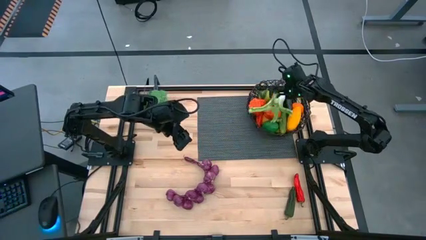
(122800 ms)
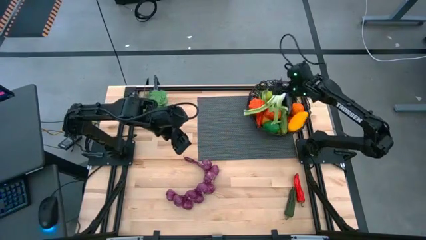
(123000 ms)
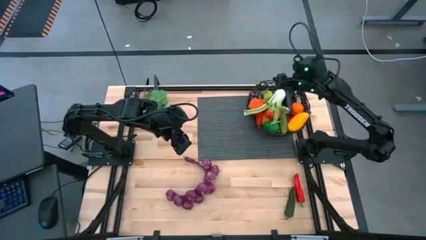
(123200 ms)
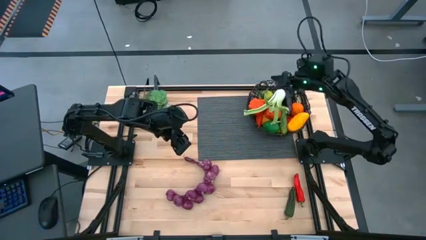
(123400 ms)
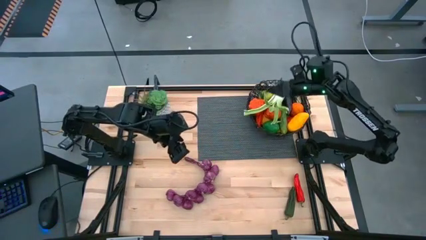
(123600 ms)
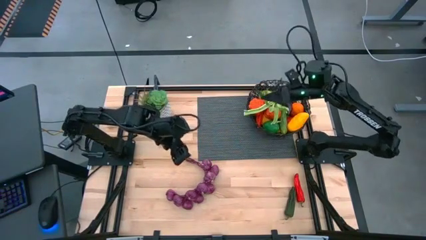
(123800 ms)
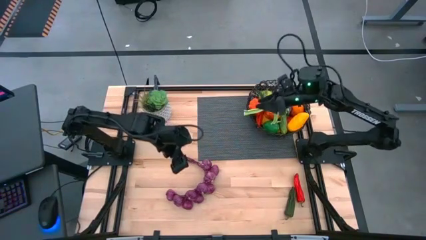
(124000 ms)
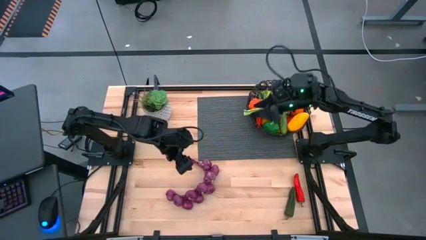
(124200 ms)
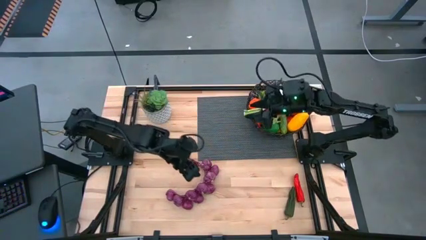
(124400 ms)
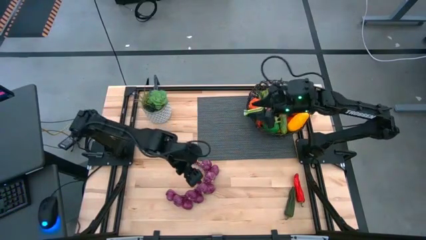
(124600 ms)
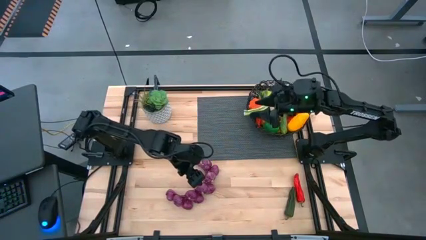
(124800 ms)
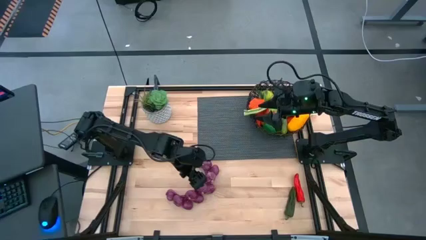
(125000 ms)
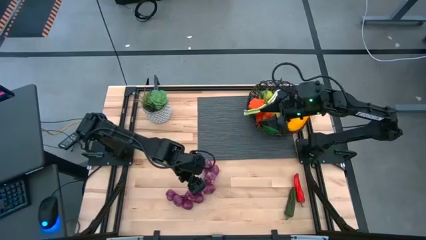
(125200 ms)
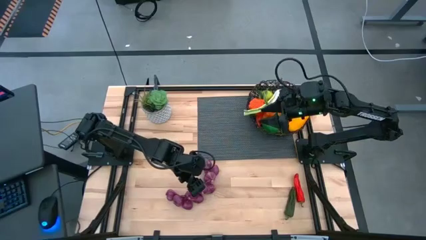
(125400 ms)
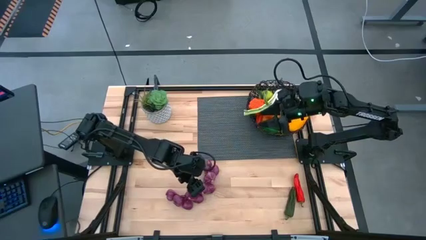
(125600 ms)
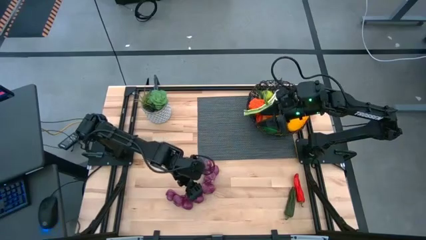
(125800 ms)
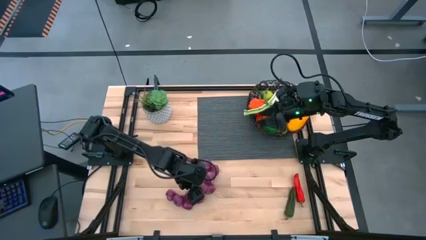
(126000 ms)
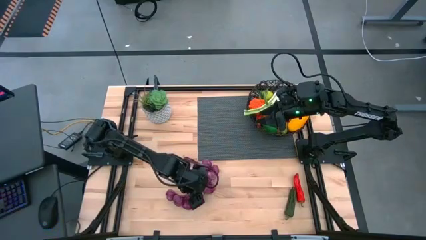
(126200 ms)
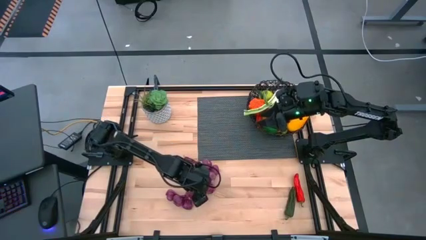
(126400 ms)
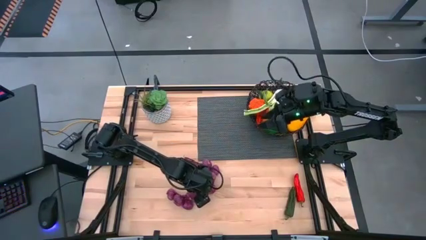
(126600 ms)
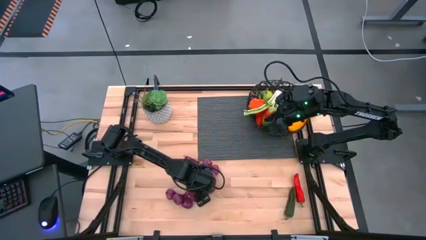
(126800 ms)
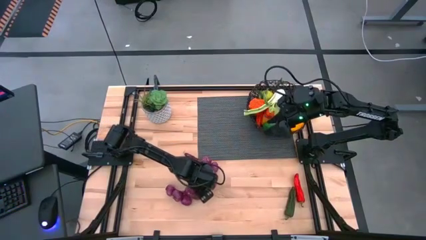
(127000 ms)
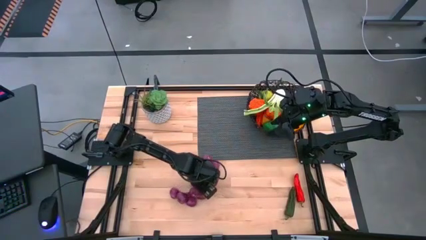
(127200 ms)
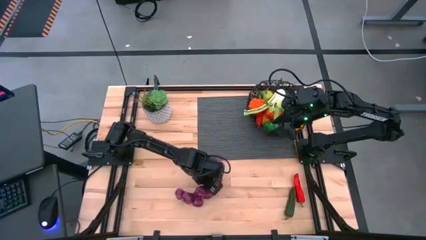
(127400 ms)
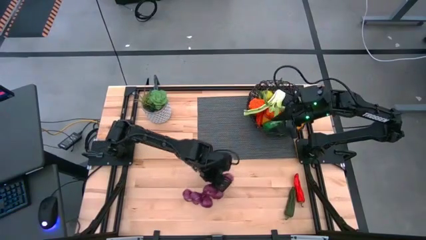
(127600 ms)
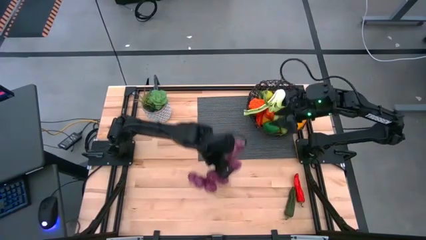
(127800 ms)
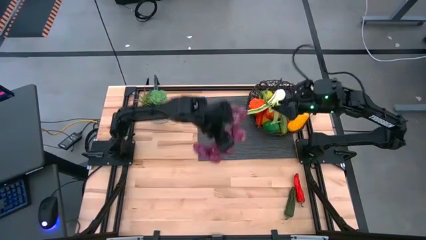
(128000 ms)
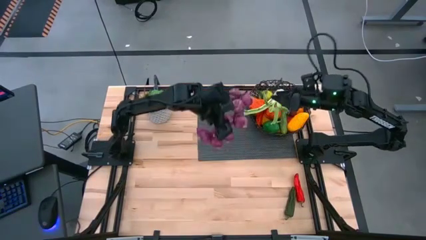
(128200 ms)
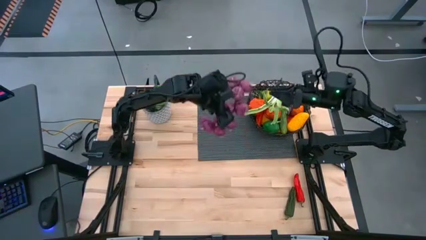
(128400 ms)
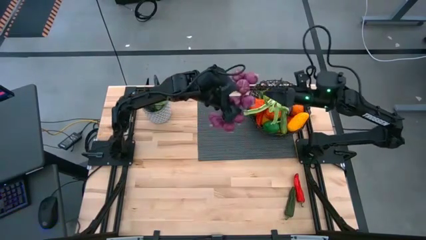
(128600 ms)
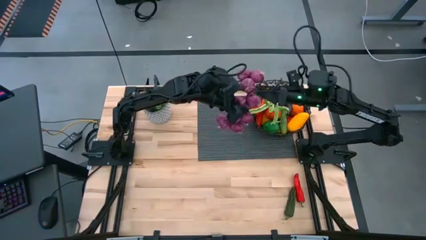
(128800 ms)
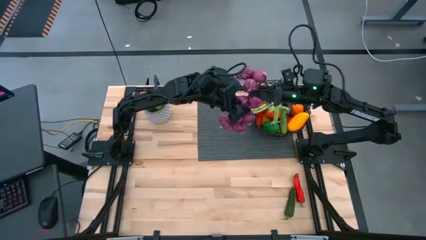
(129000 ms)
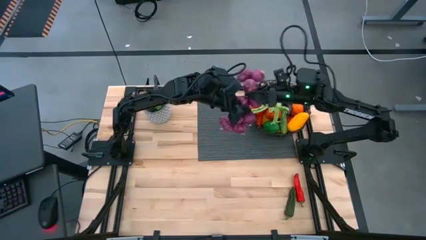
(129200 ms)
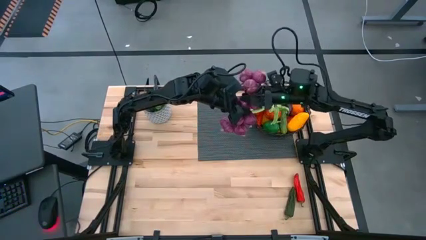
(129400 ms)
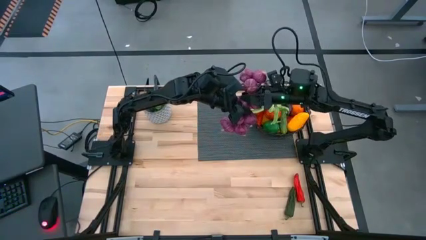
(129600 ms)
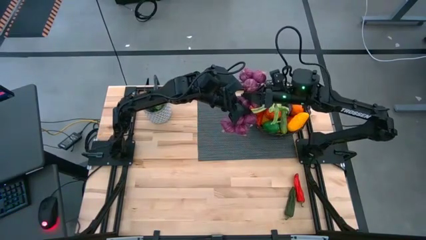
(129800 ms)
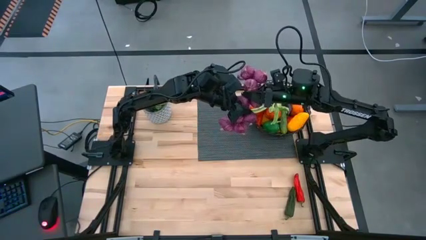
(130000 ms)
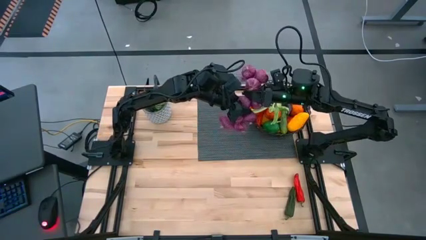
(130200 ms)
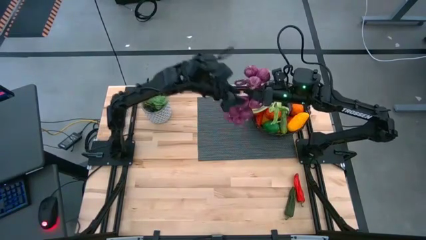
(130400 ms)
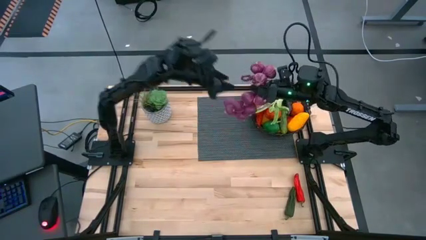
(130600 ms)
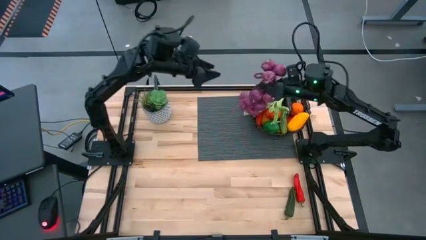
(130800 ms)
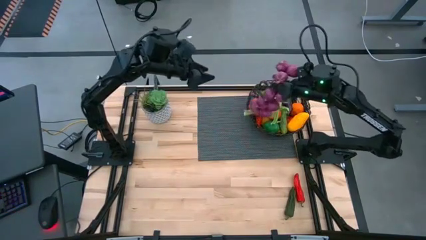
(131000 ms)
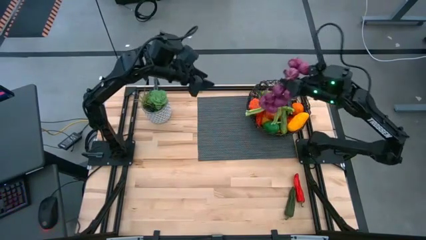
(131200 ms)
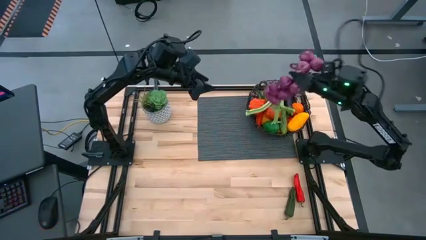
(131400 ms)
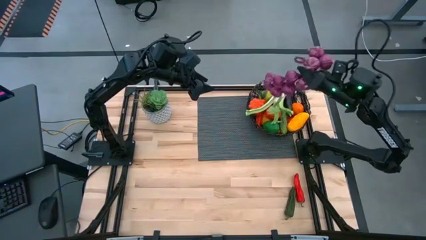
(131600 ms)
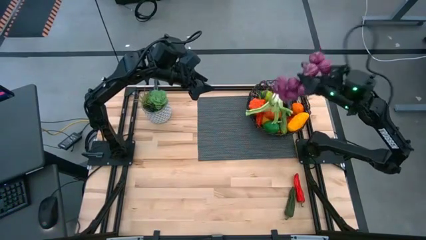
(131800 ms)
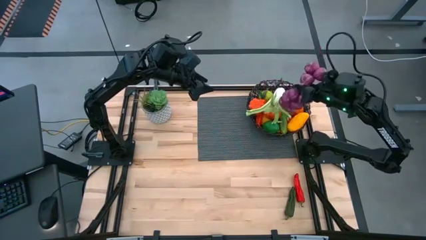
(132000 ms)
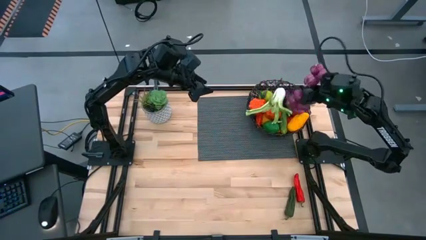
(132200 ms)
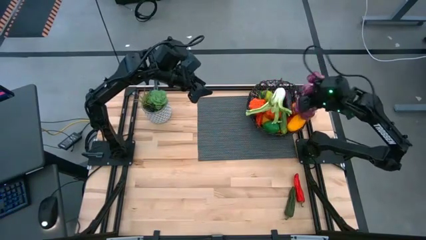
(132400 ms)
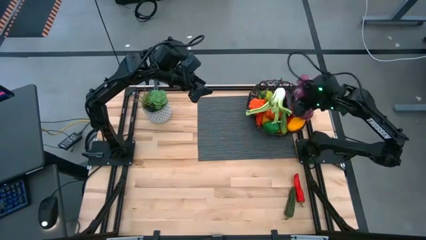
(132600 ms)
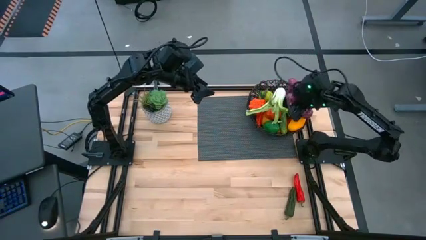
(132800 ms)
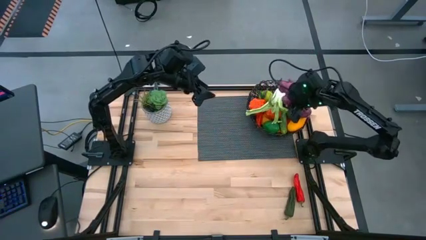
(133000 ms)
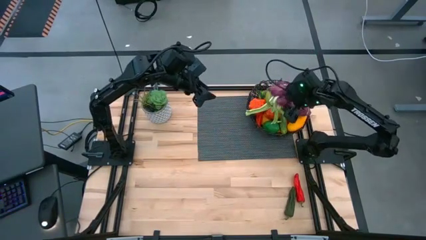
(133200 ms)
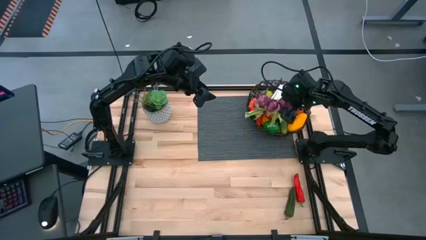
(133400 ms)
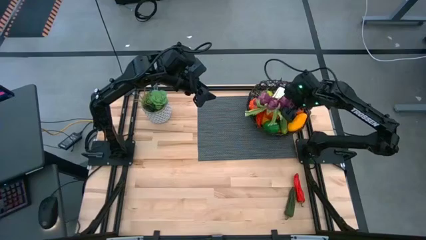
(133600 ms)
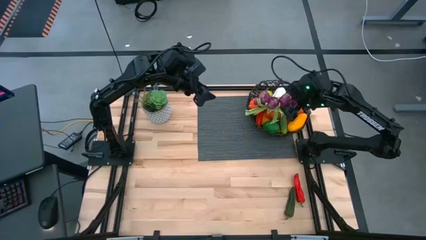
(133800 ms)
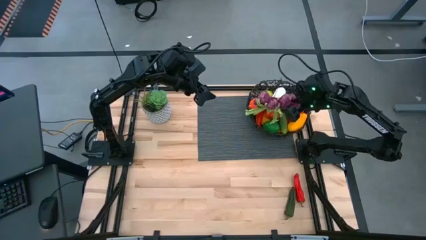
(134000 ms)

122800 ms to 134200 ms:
Task: Build produce basket
Put the purple garlic into the black basket

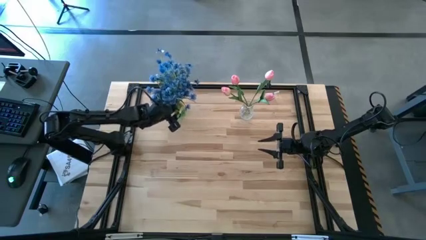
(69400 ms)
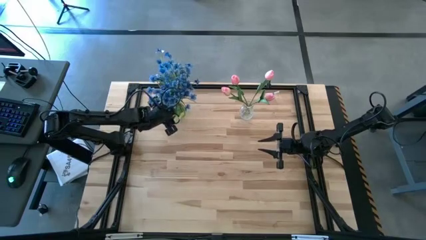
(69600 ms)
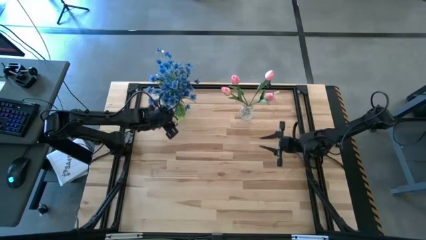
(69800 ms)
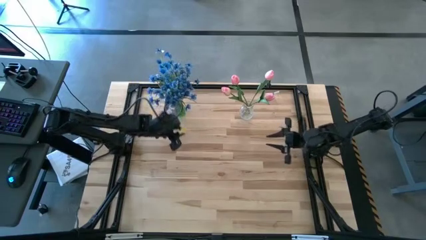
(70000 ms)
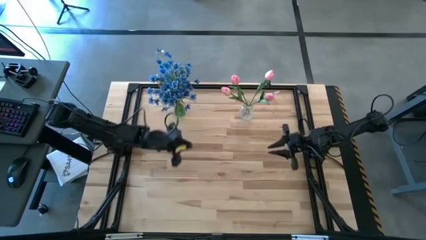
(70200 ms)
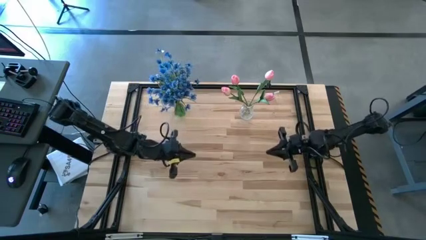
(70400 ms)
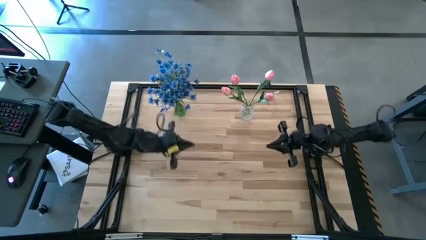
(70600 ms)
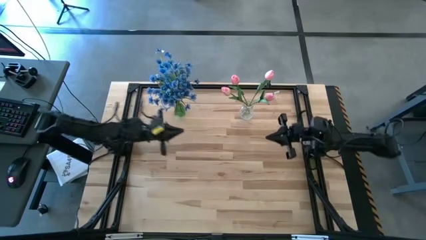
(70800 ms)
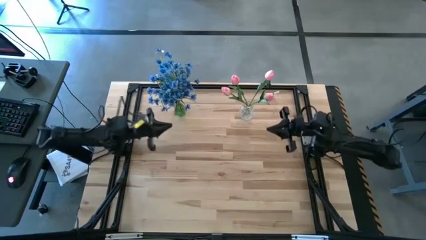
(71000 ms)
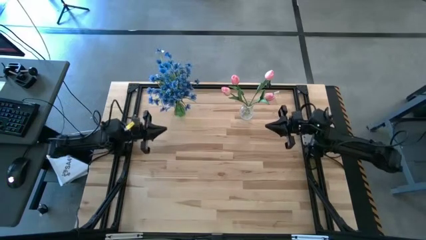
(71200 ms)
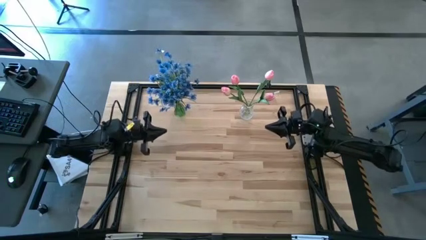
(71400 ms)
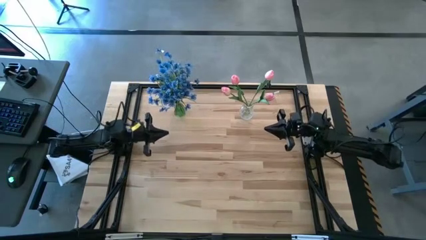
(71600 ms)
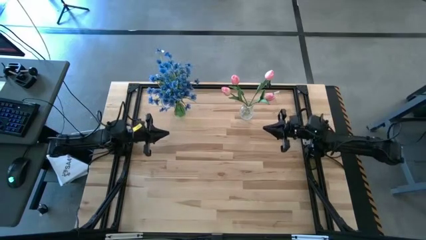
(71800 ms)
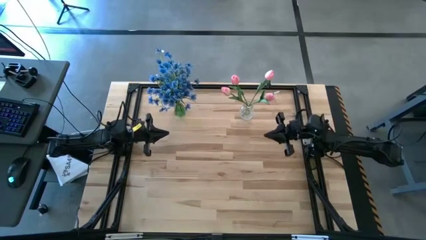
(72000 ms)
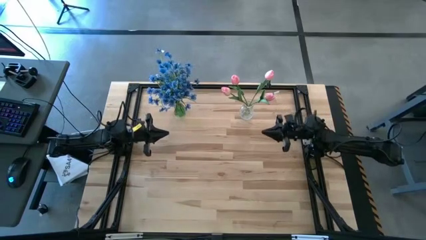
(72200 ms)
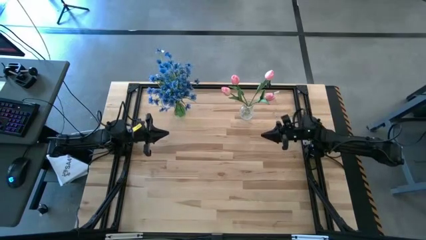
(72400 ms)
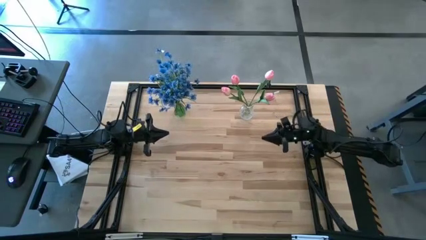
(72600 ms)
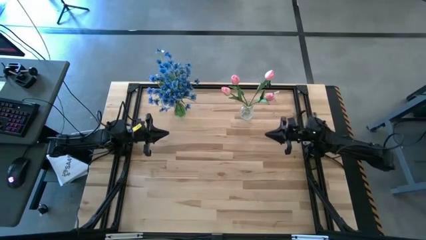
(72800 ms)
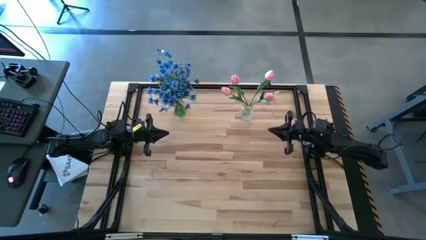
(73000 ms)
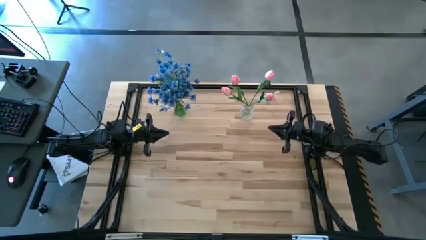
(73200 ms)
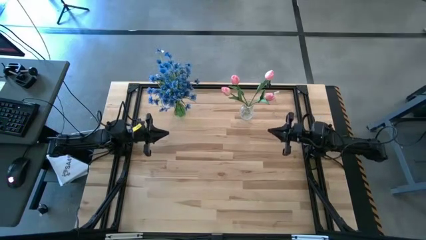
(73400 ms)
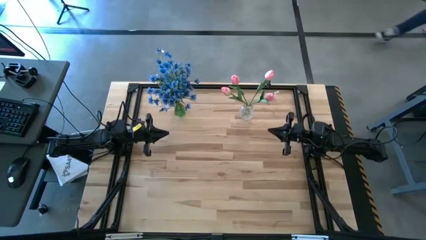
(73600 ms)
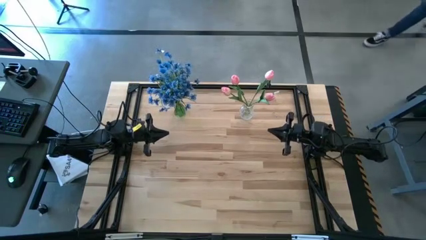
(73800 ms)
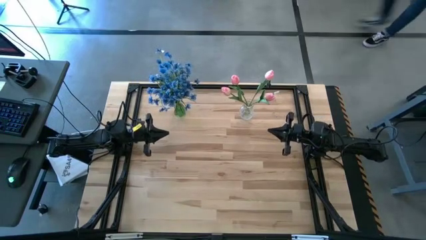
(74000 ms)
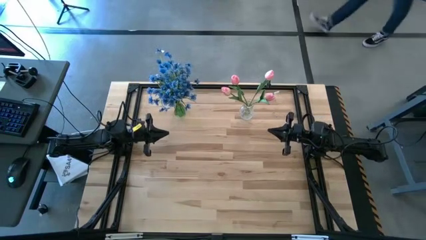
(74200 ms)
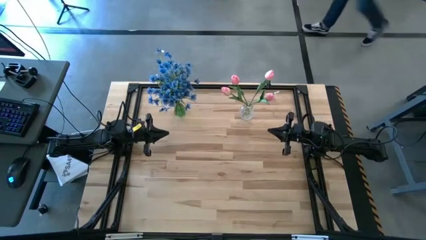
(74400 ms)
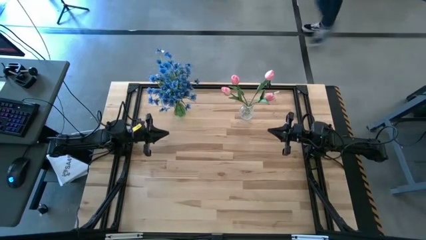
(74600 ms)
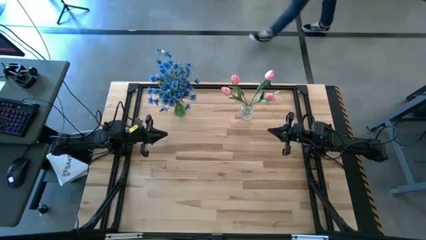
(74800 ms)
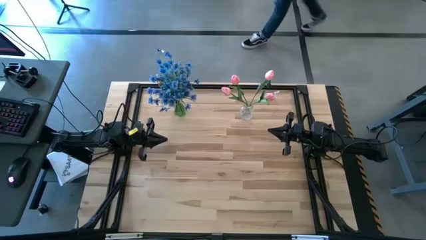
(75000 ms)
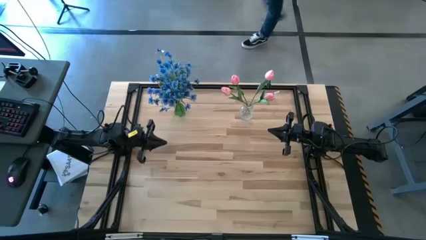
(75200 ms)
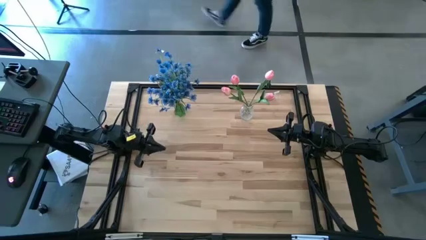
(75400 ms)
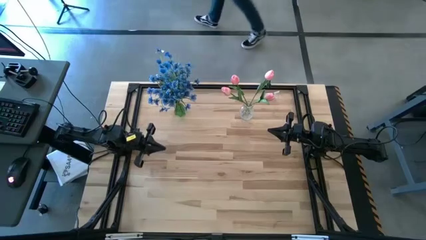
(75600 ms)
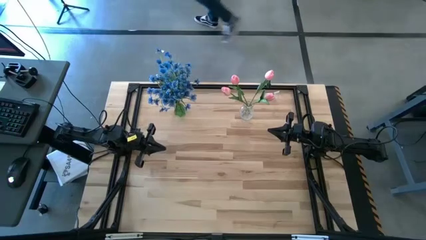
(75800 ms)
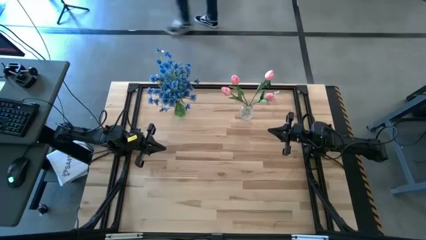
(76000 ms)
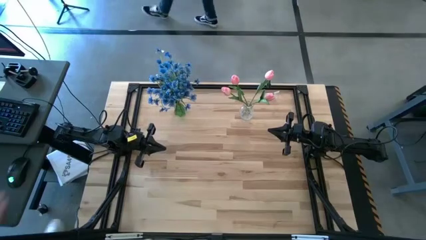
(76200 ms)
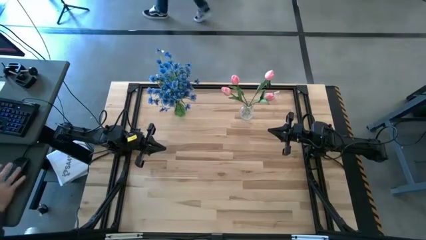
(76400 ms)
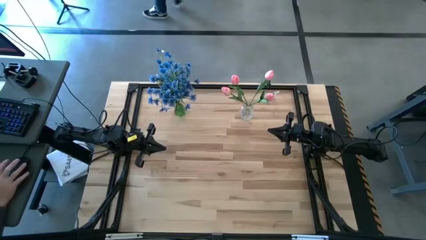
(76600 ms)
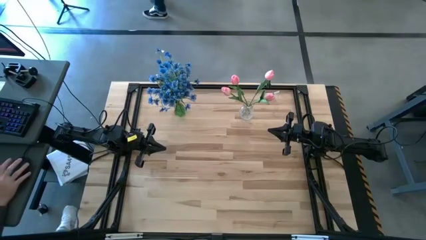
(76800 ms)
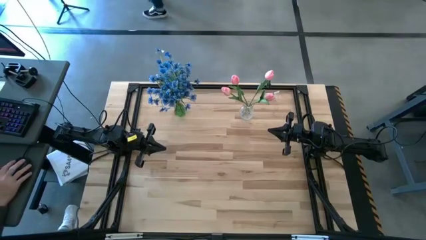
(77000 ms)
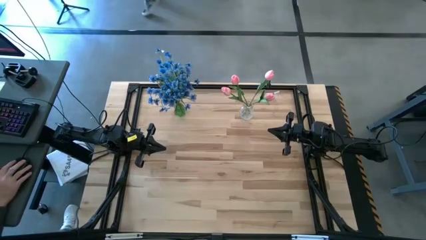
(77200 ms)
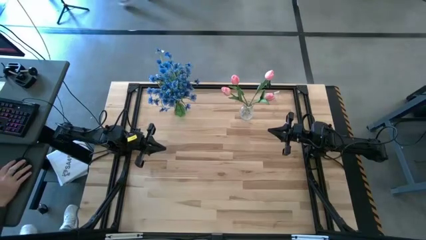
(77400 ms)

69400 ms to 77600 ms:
Task: Sort flowers into vase by color
Return to Home Position
